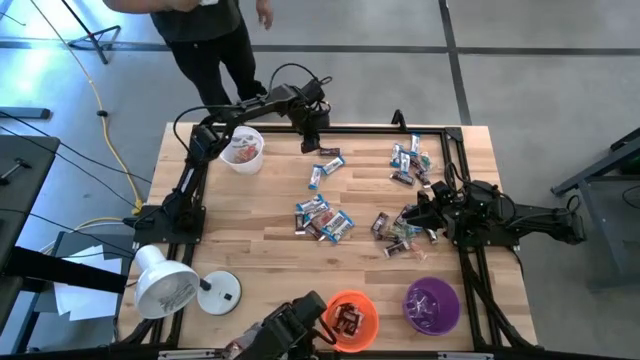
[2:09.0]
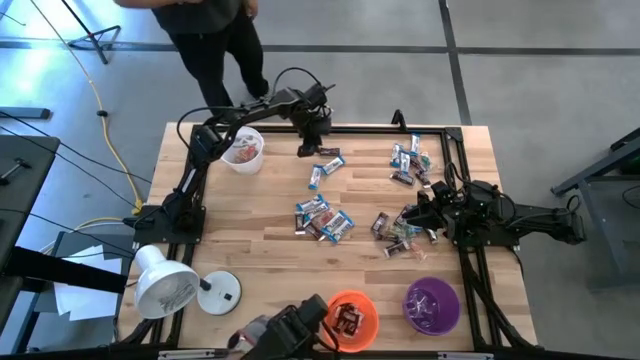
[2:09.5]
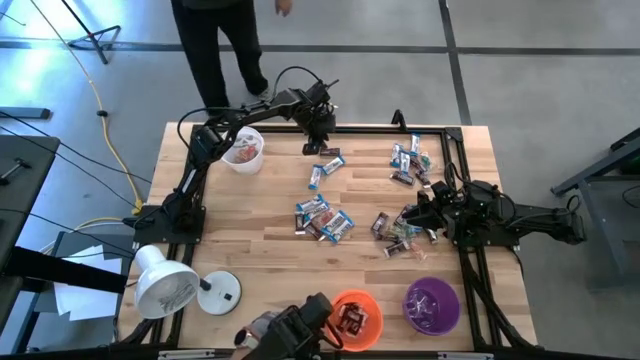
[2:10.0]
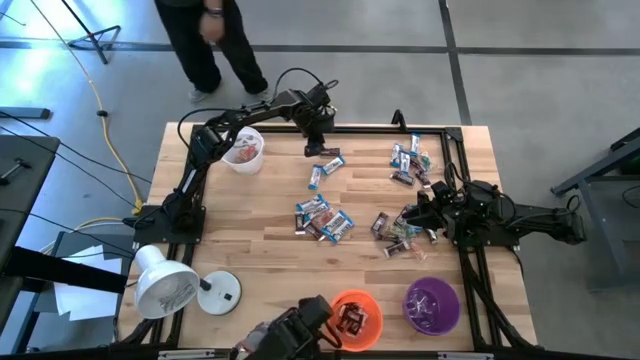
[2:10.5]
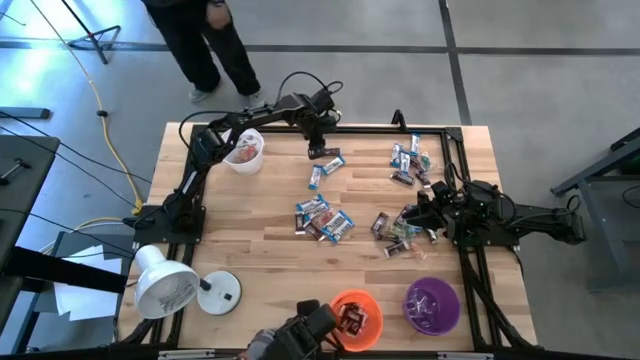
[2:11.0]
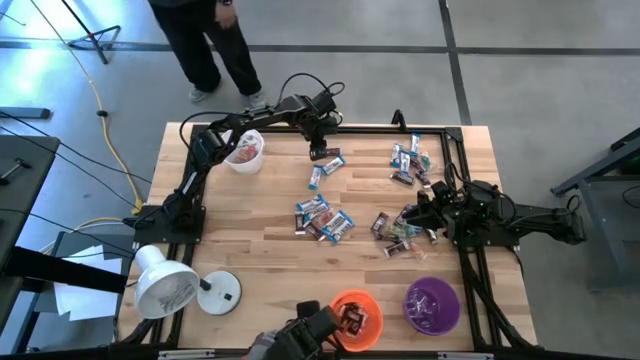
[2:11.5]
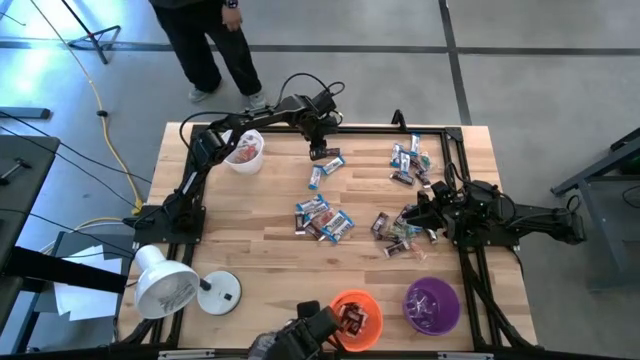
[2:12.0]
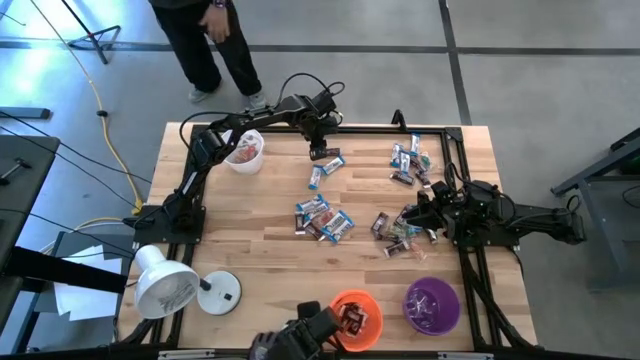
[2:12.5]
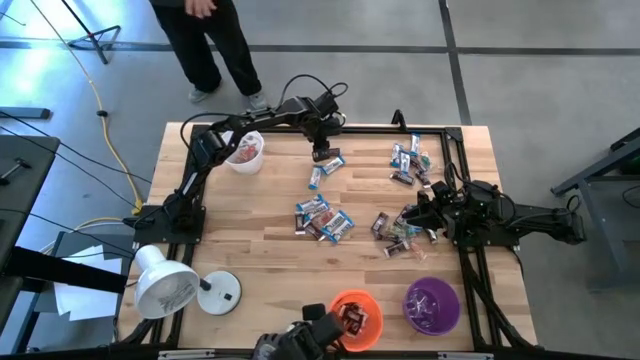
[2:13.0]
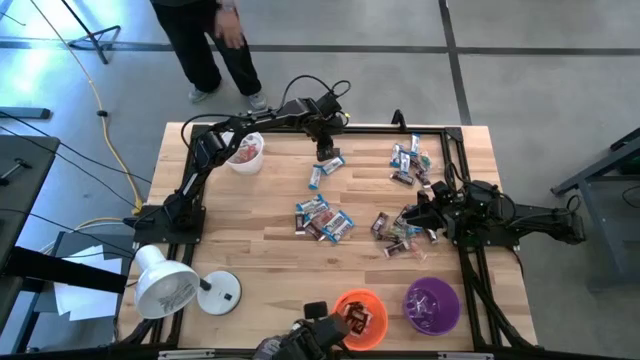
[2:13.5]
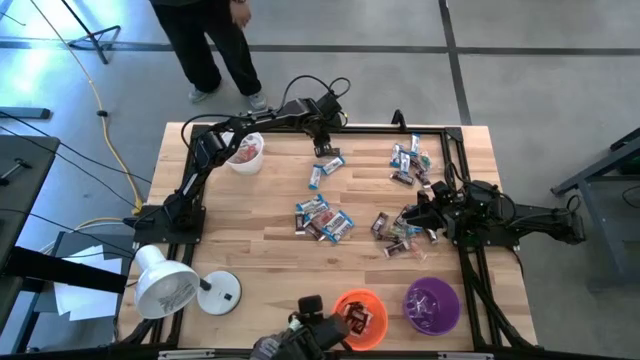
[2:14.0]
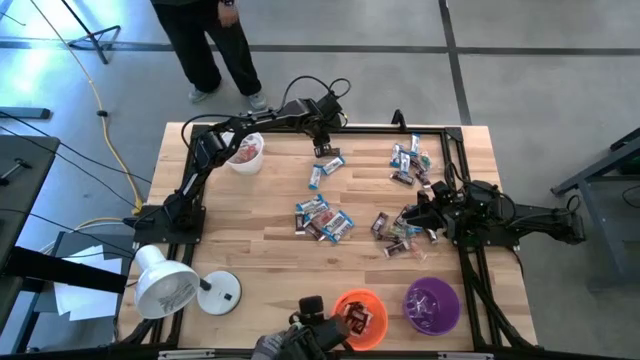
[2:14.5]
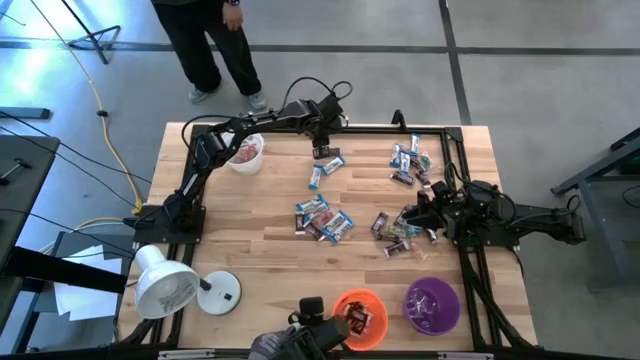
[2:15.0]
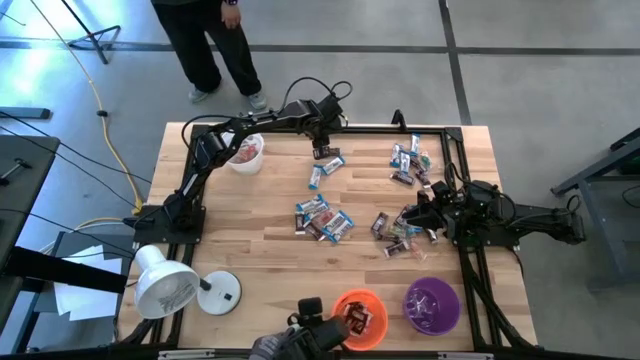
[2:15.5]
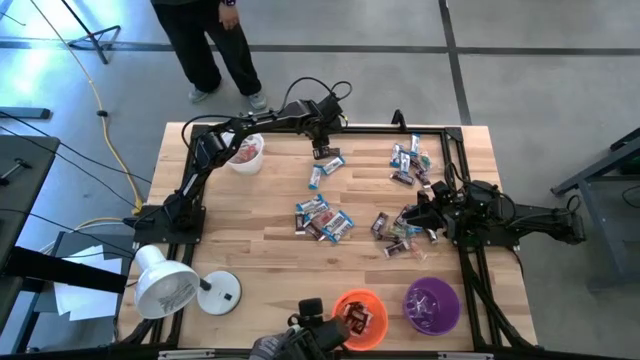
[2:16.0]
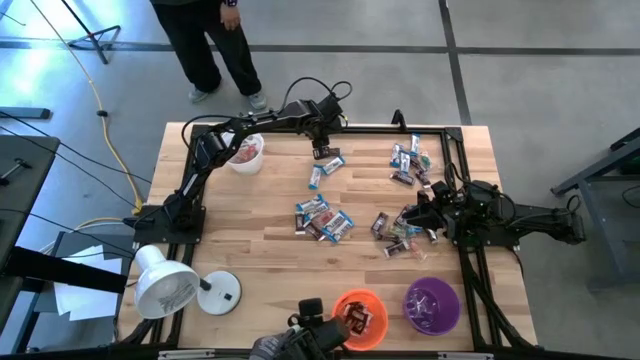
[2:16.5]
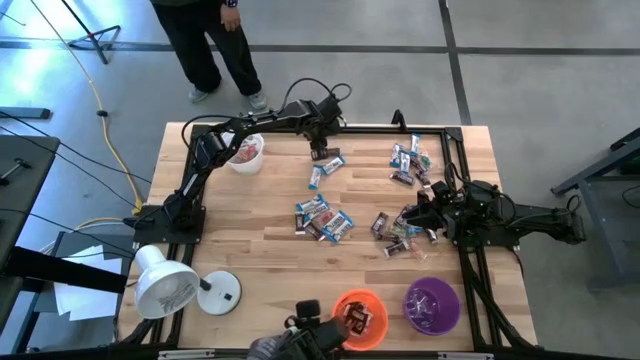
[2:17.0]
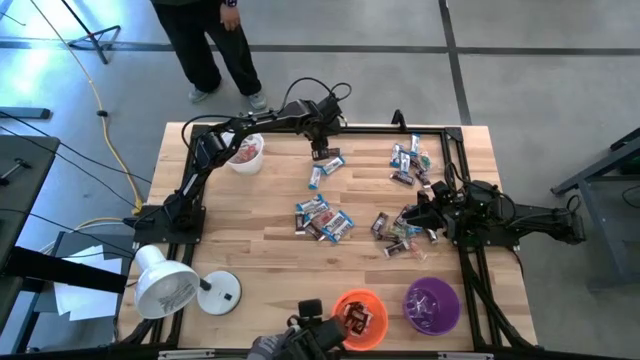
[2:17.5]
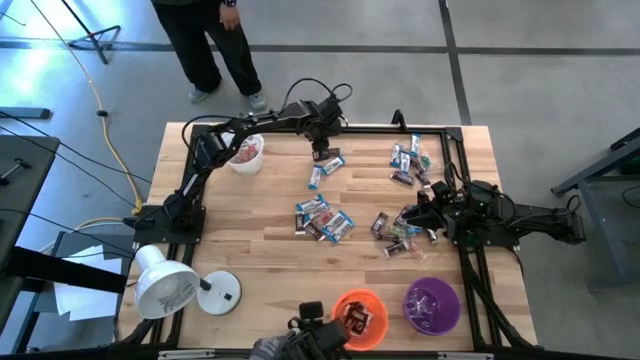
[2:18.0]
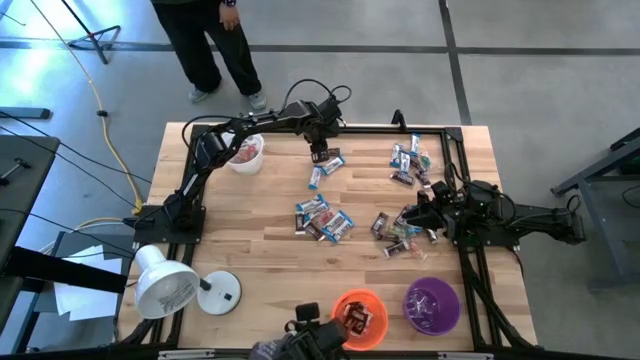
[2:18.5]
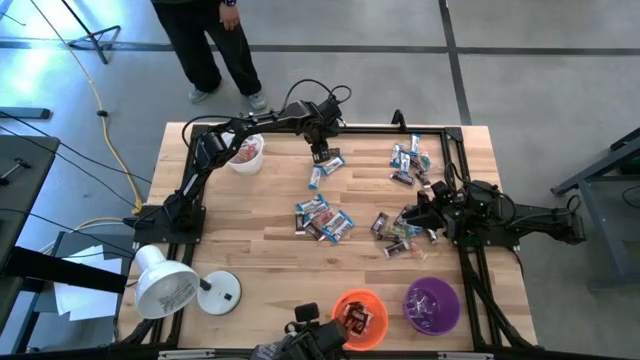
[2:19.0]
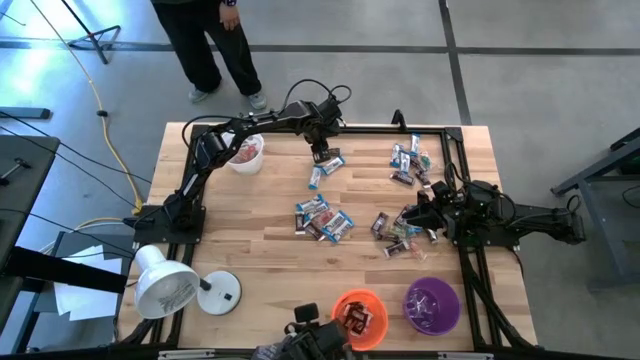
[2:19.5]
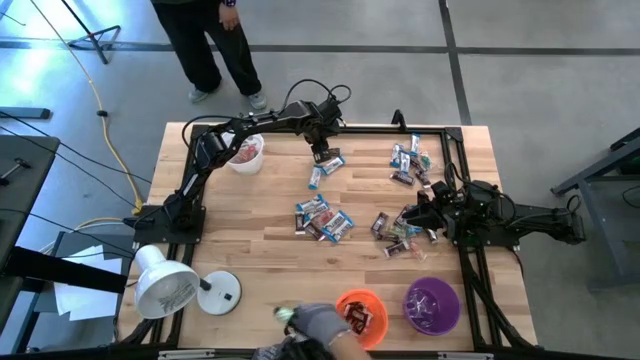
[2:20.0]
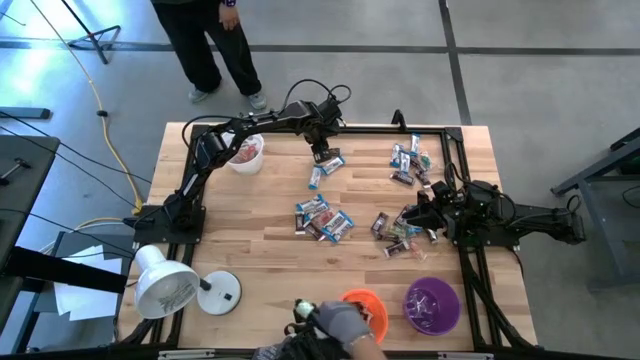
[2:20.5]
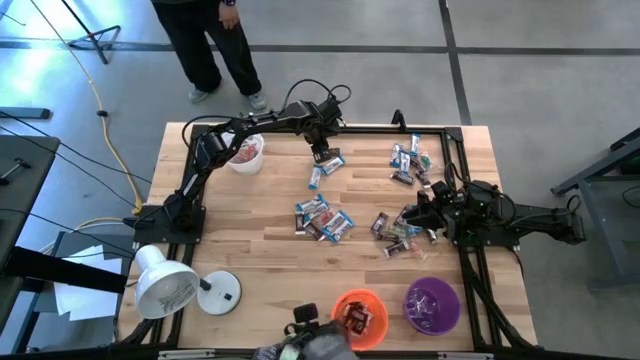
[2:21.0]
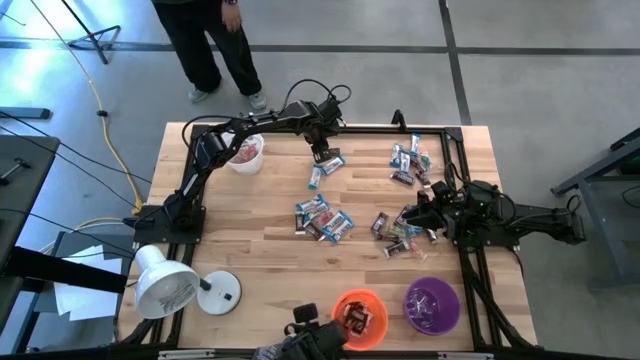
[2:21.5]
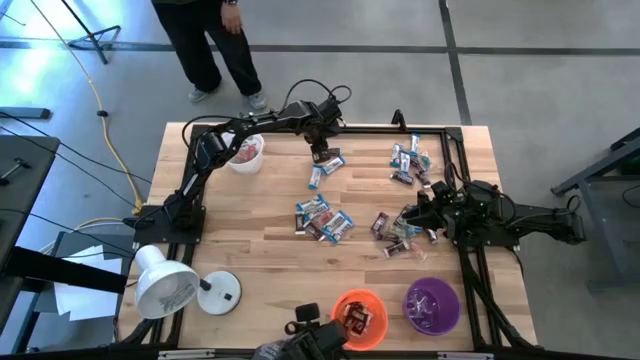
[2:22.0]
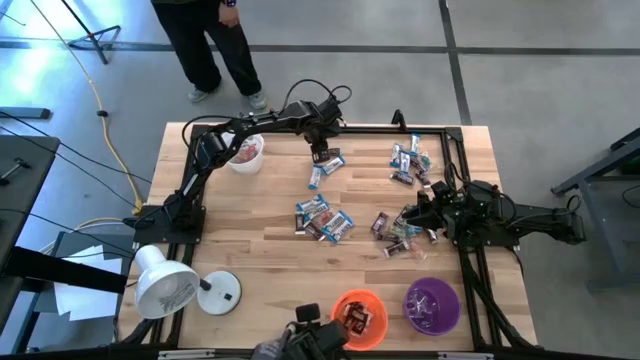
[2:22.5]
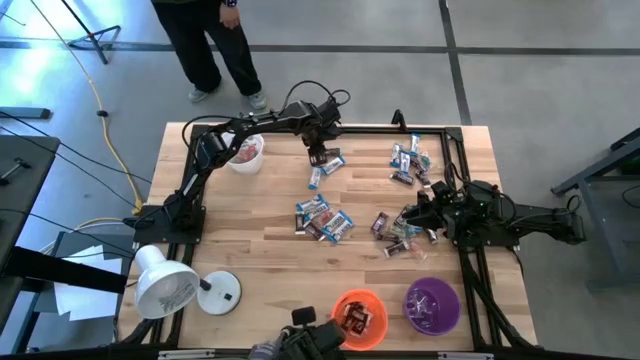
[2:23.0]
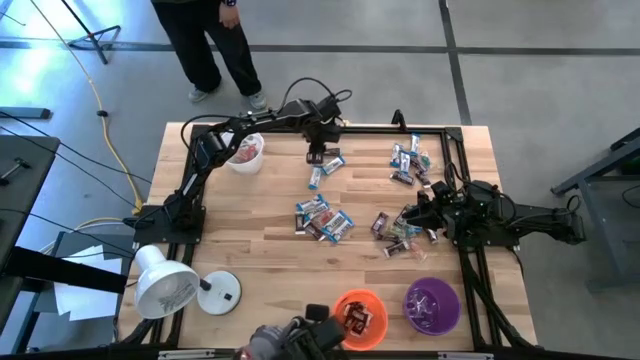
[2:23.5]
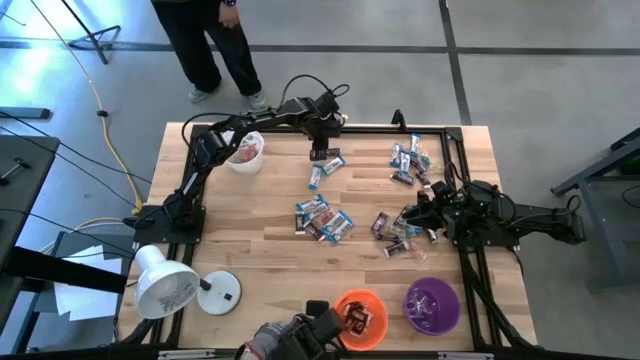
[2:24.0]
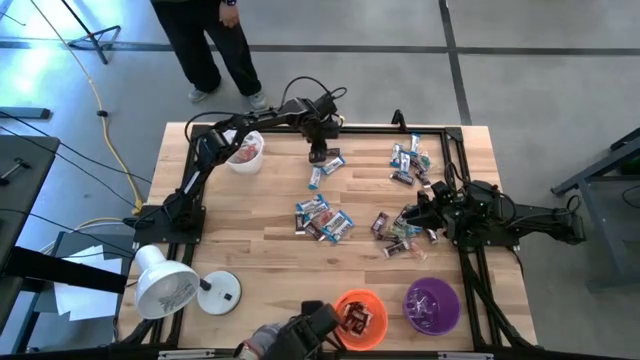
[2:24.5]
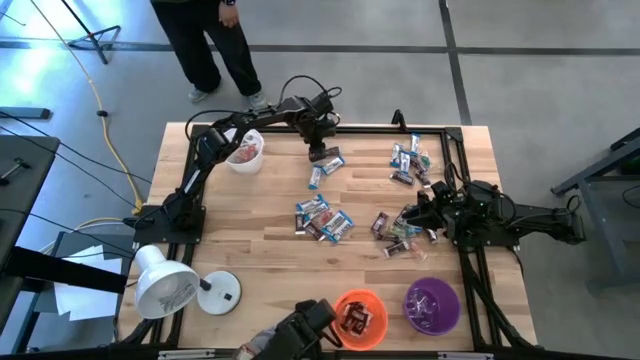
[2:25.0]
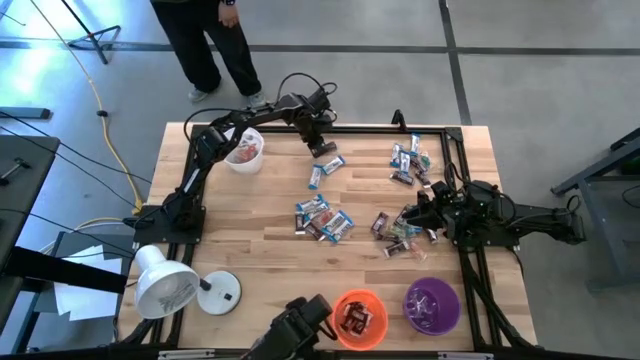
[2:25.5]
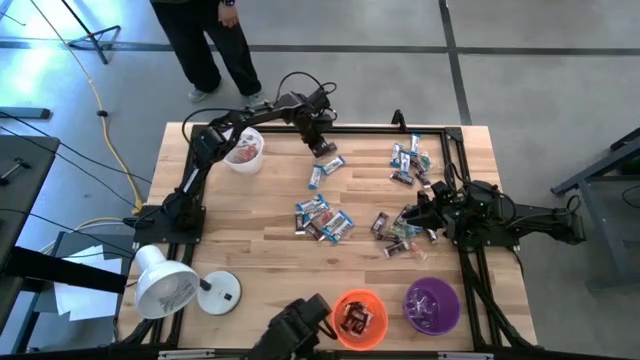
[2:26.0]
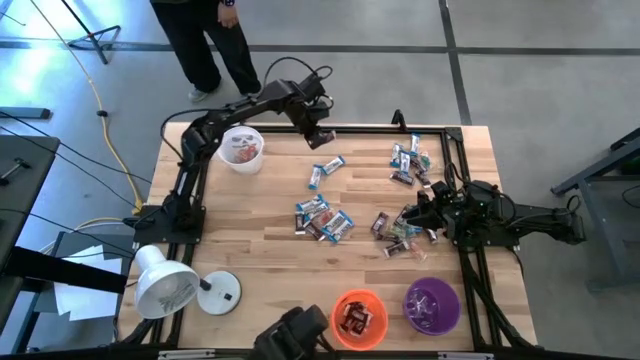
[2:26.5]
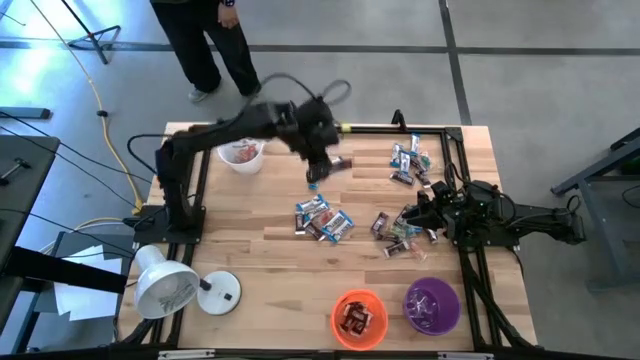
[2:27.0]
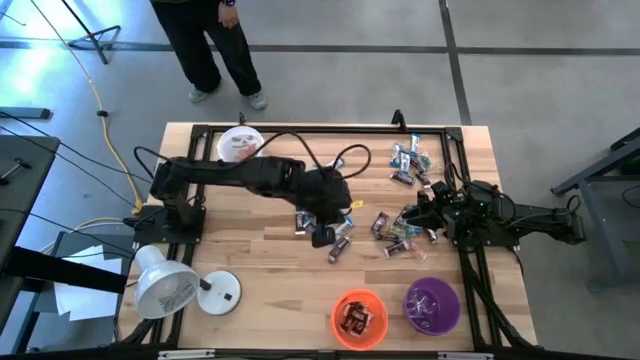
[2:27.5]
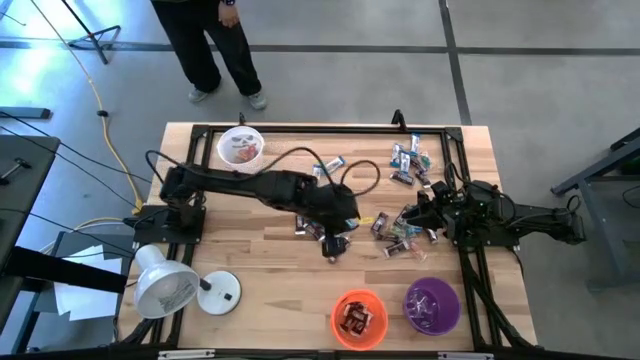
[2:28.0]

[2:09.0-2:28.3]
Task: Organize candy in baskets
Put the brown chocolate into the orange bucket

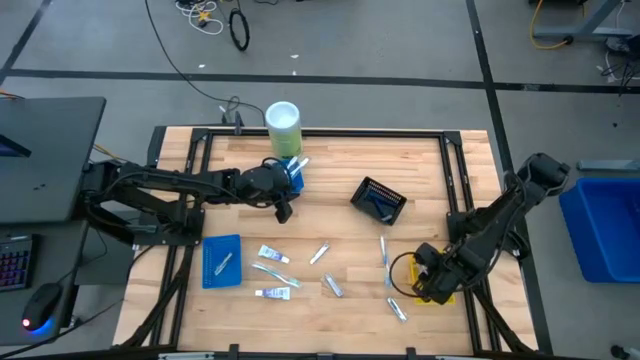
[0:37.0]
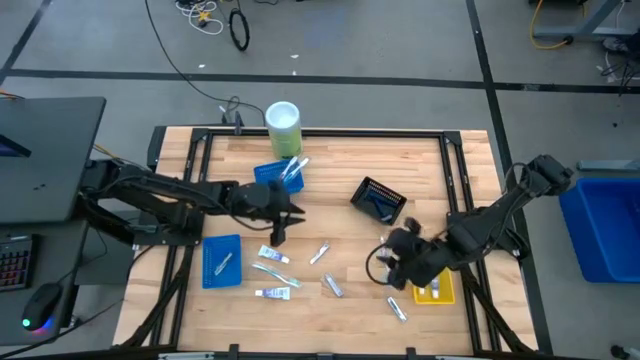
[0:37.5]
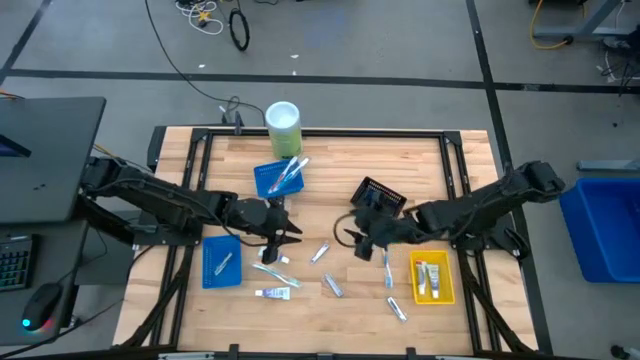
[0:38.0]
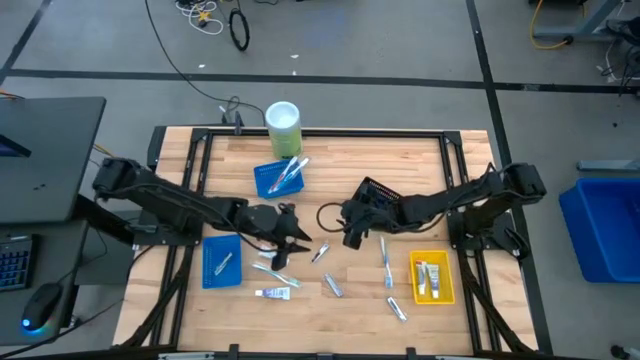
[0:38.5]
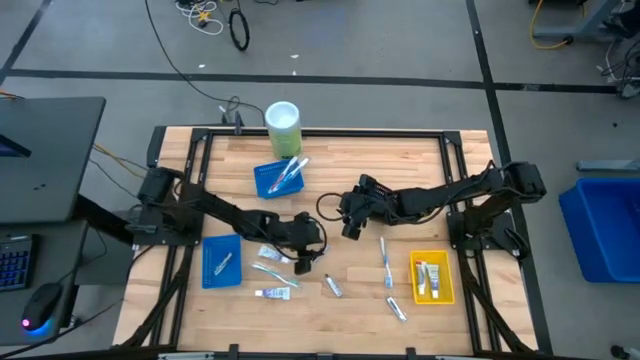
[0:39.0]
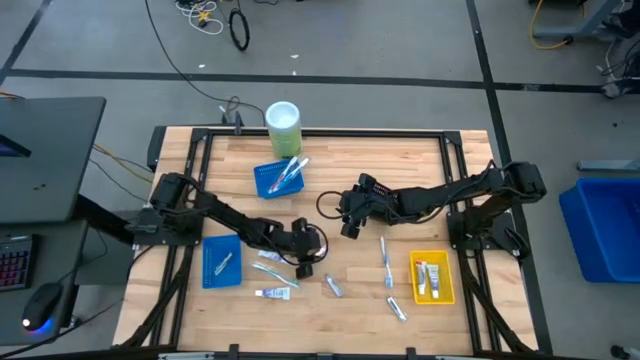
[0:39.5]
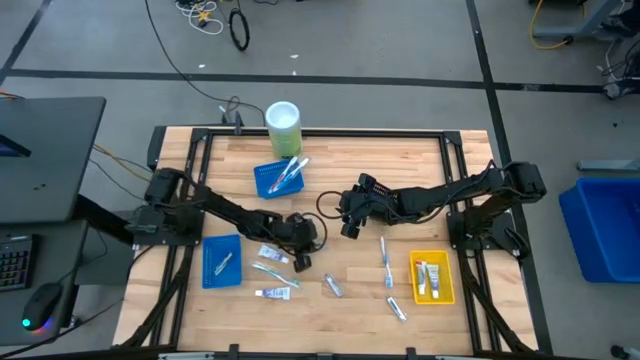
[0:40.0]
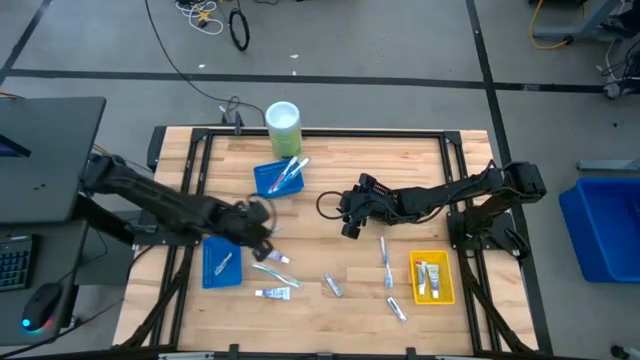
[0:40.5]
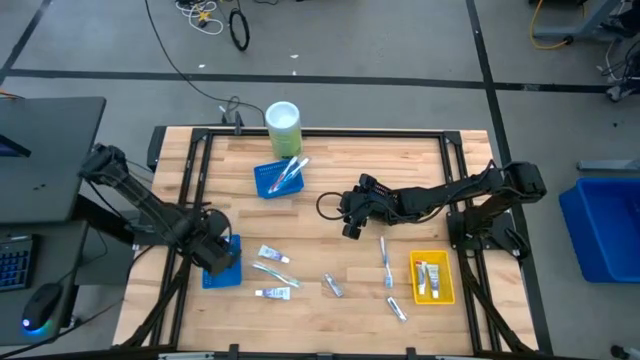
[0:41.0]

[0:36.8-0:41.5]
Task: Pick & Place Travel size toiletries
Put the silver nail cutter into the bottom blue bin
